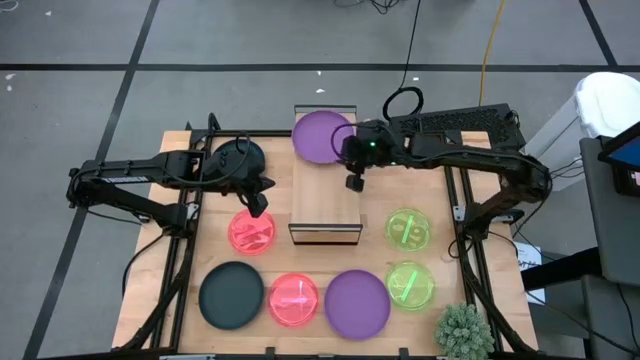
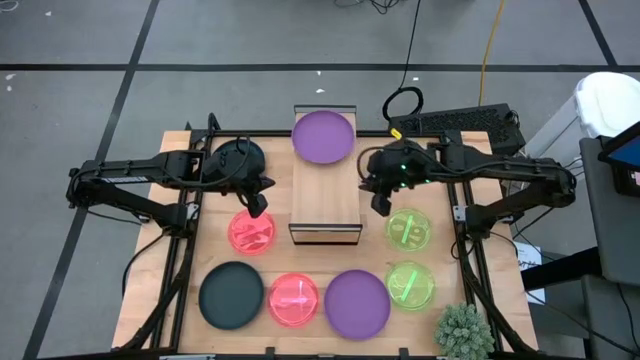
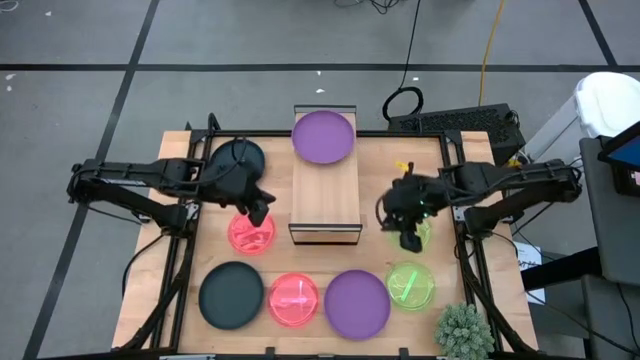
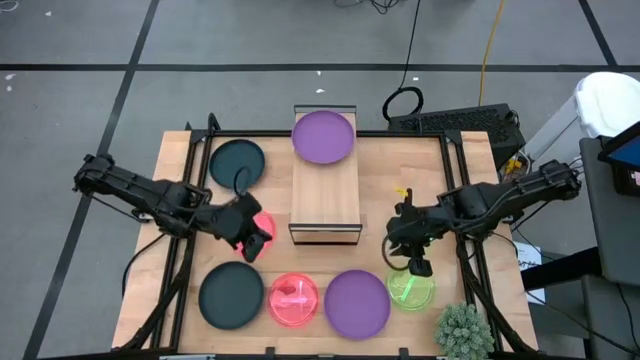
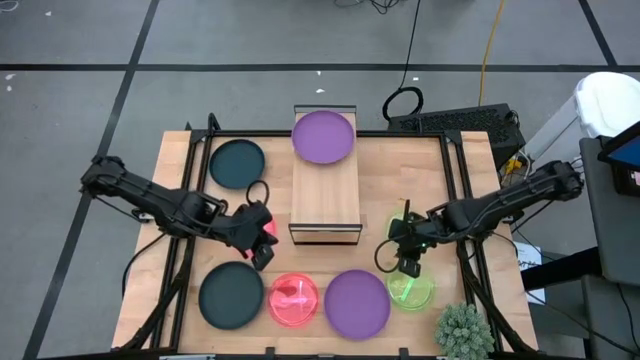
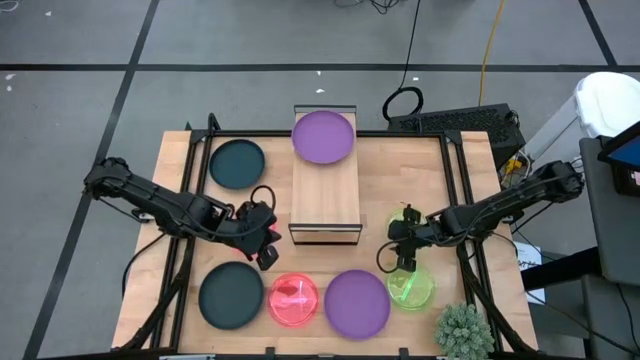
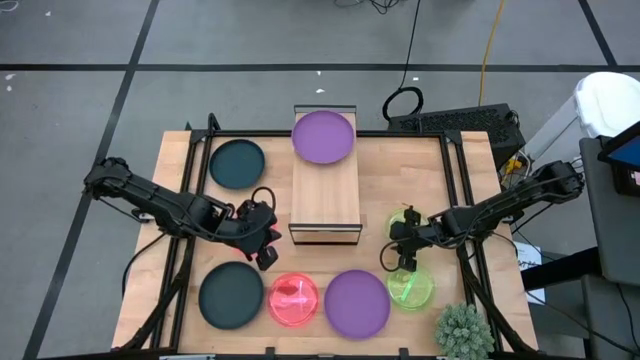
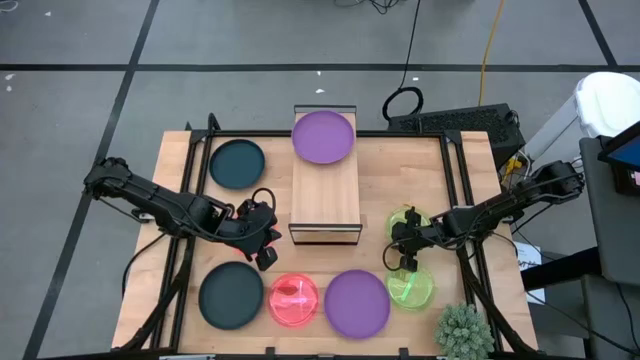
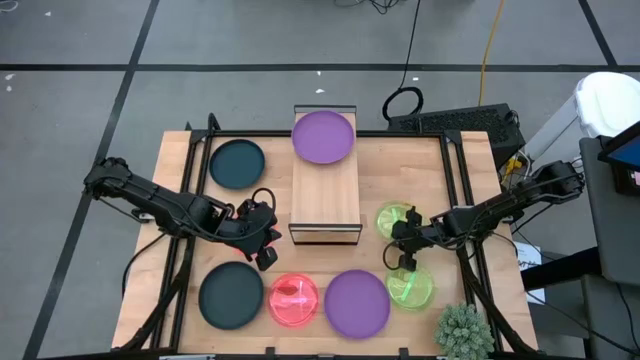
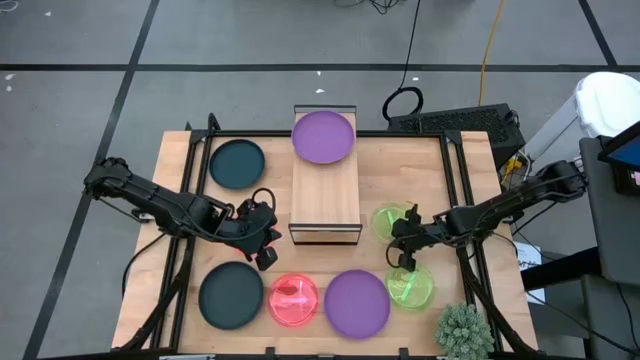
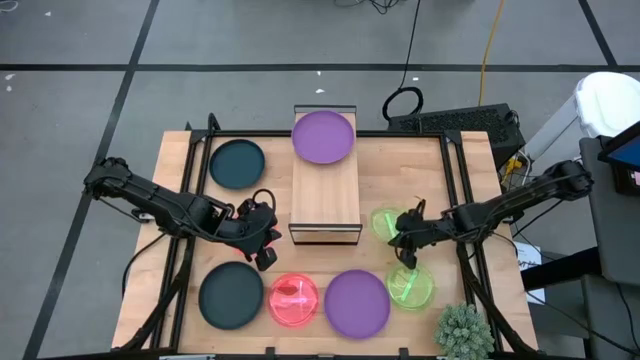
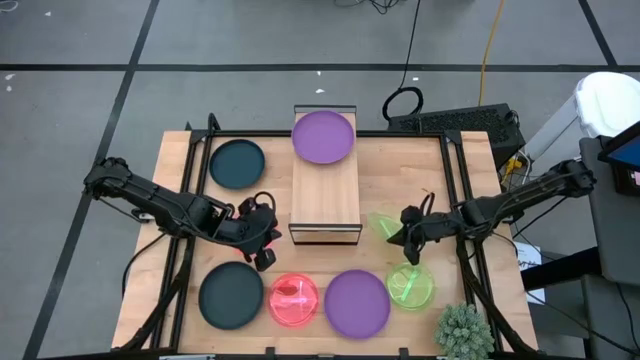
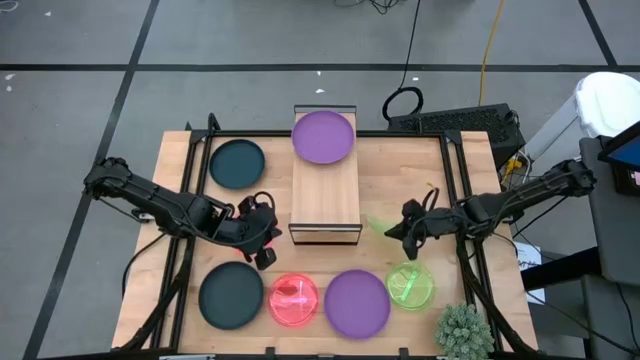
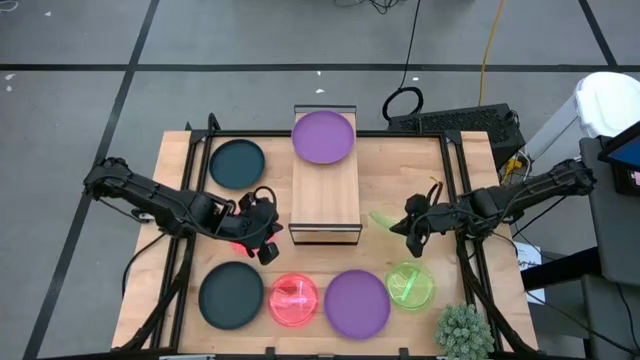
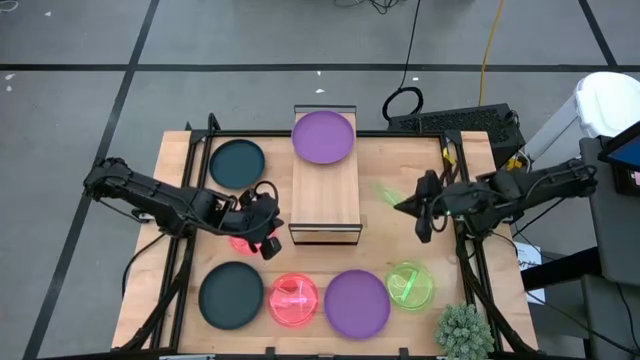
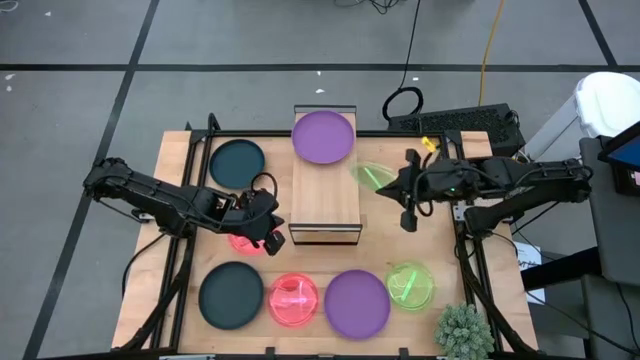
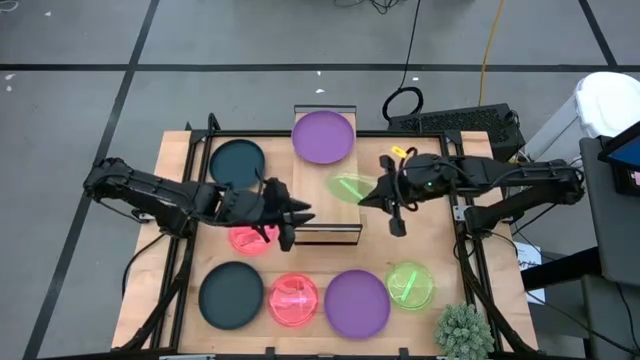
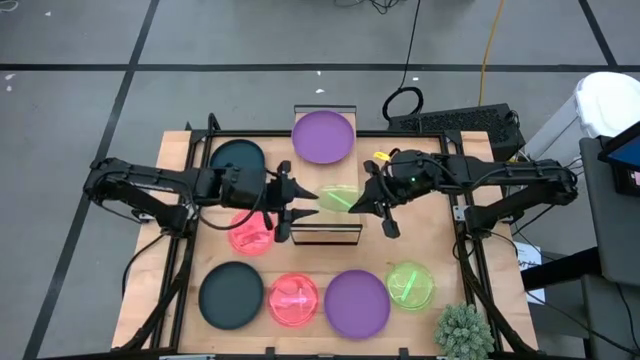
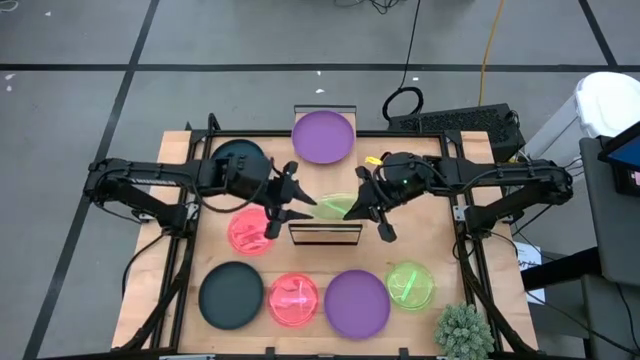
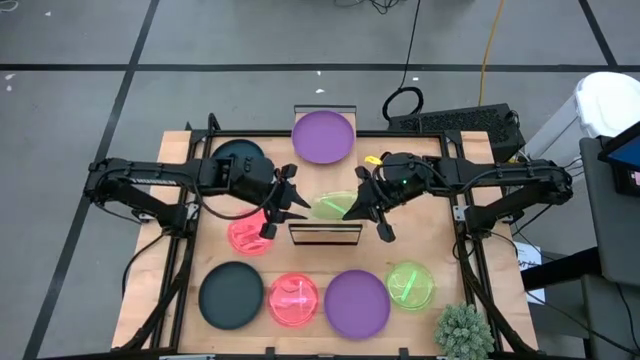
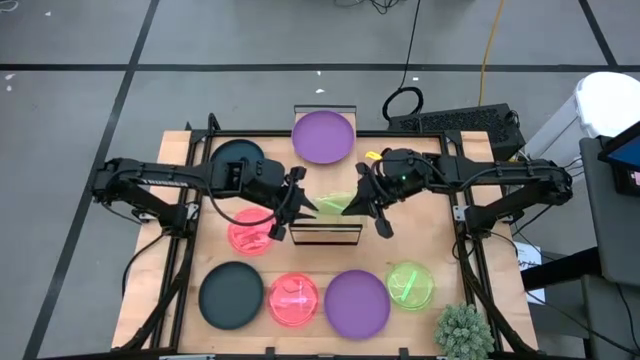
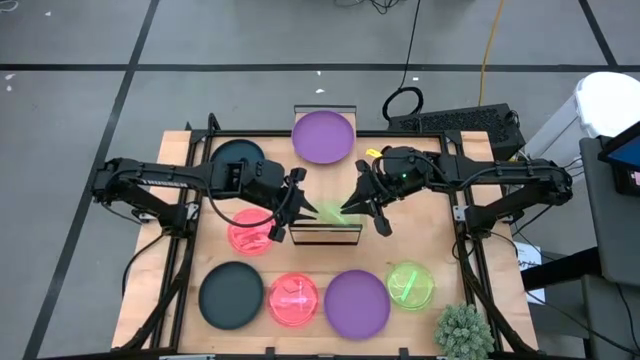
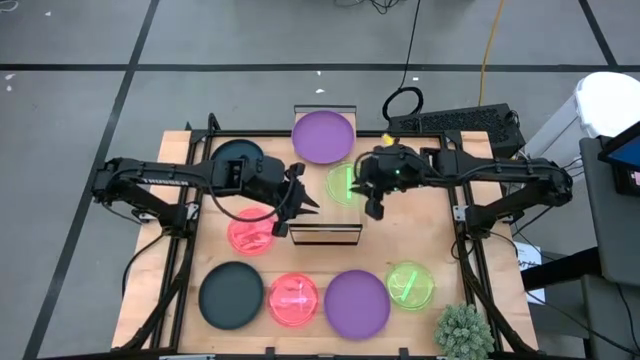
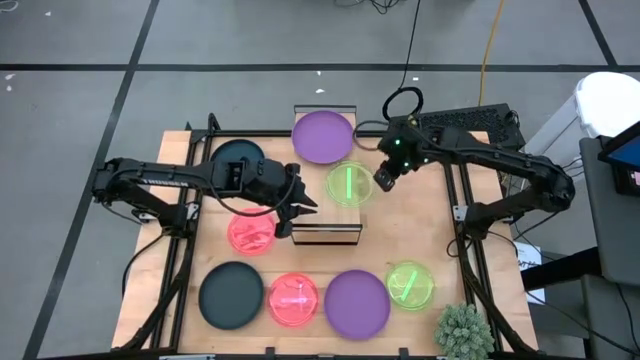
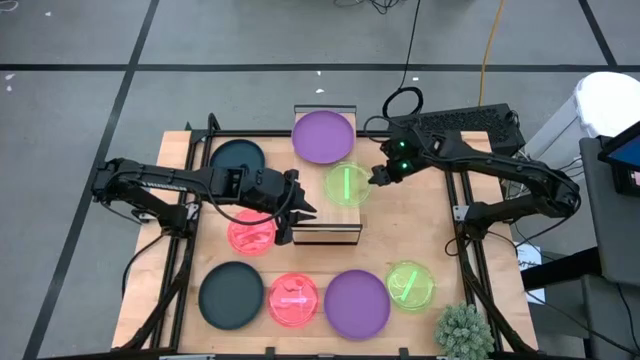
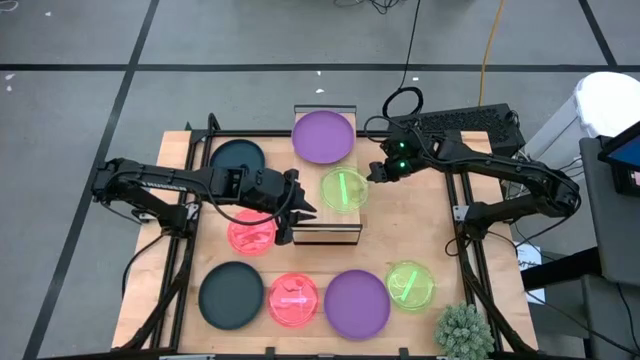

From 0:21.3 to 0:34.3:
Task: Place and stack plates onto a shelf
Put the top green plate on the shelf

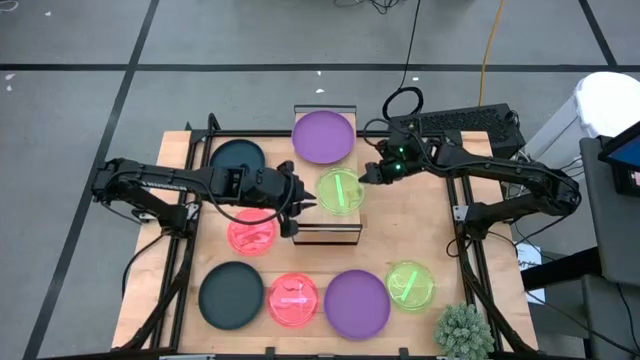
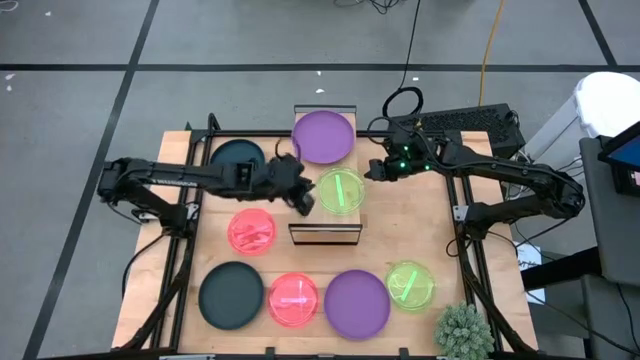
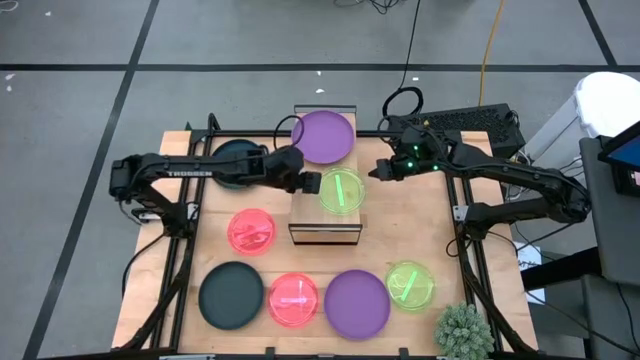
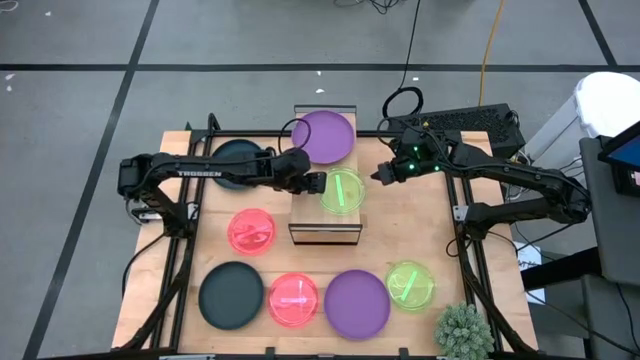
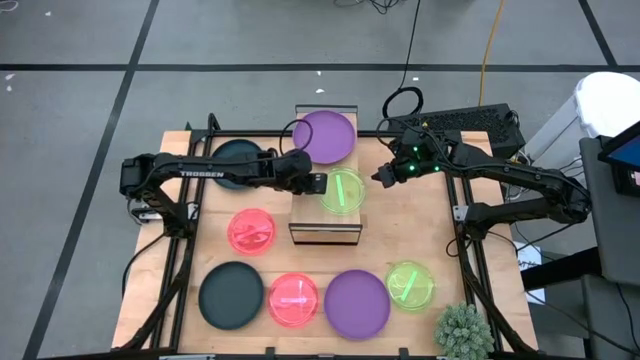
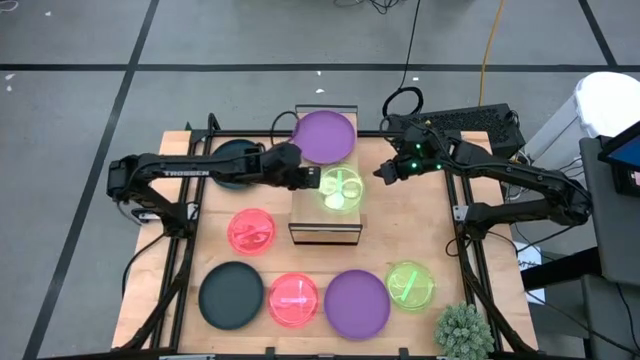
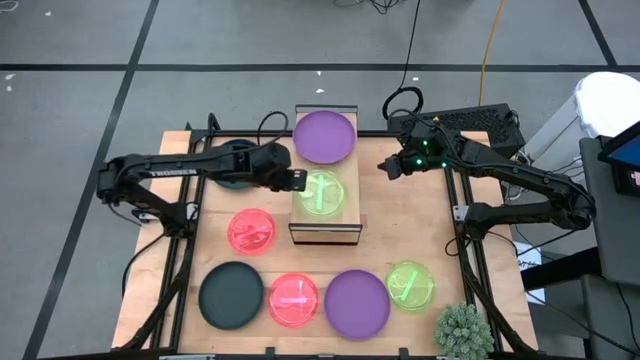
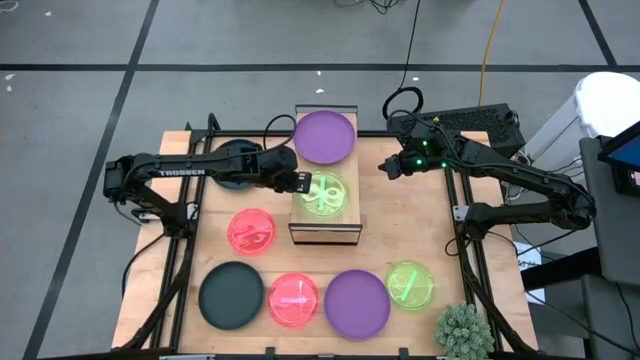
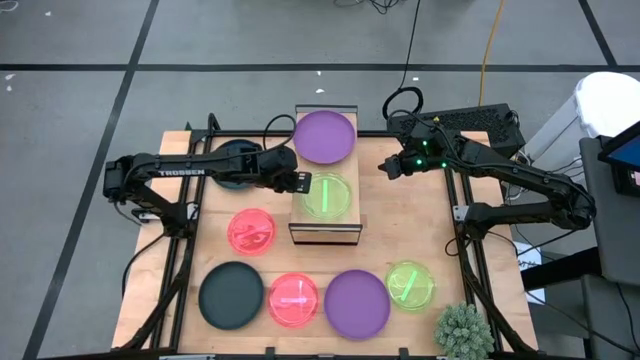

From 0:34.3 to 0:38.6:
Put the top green plate on the shelf

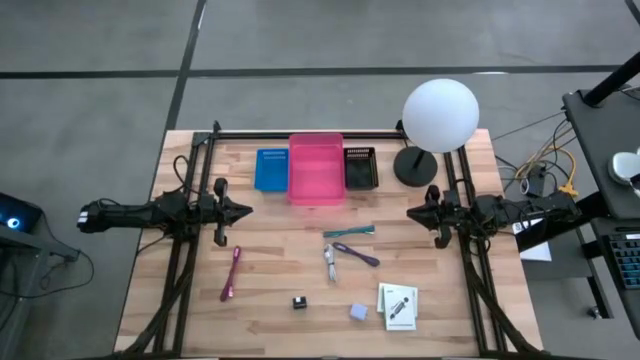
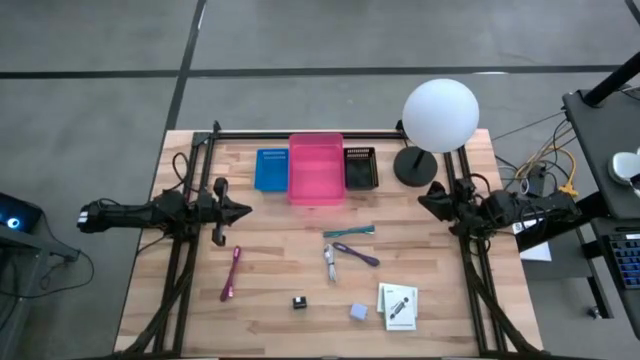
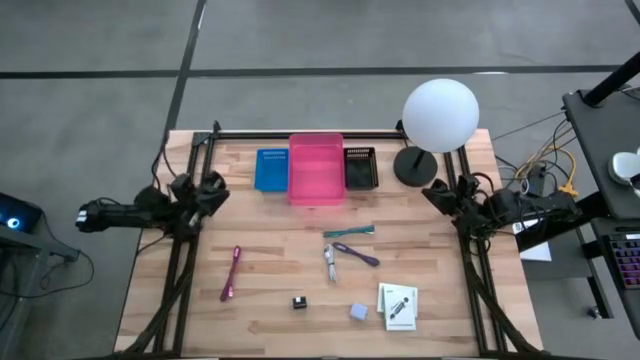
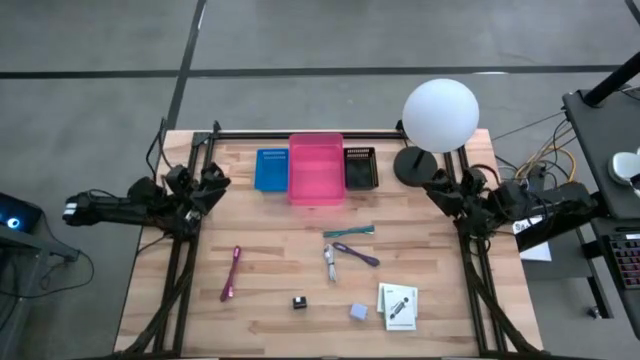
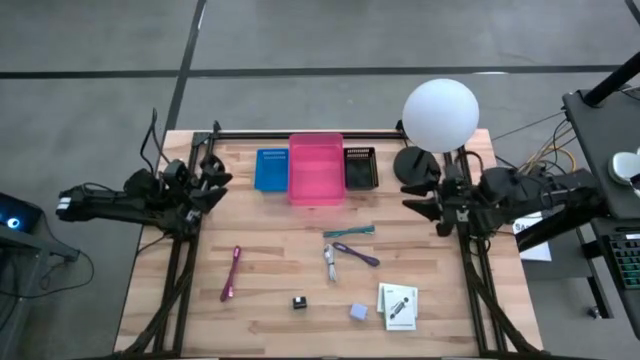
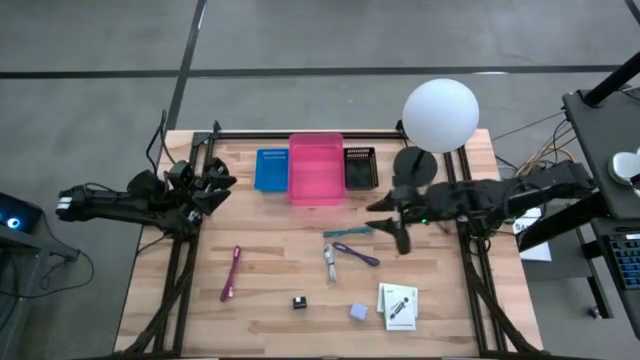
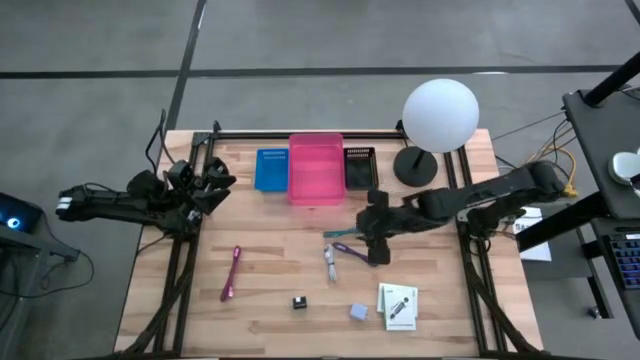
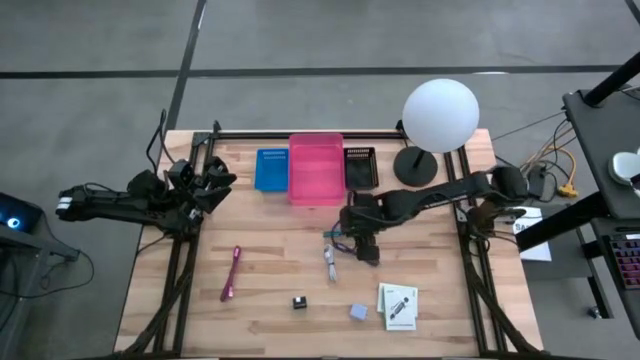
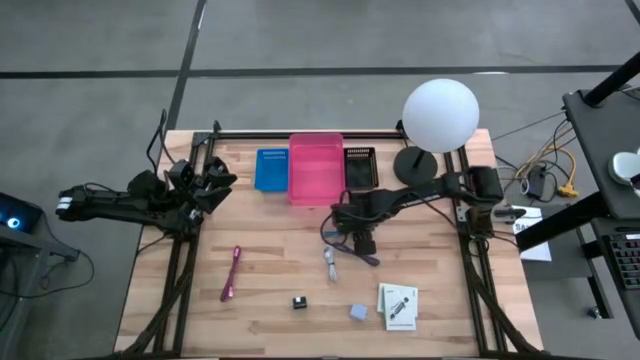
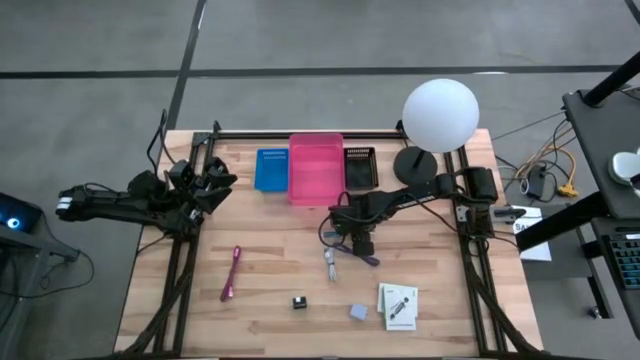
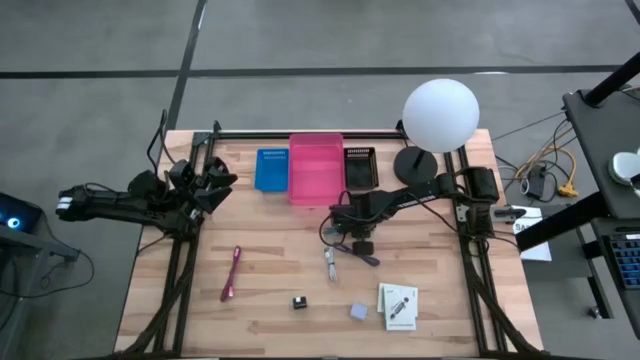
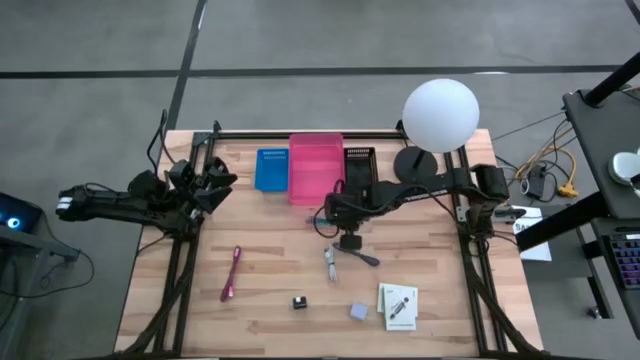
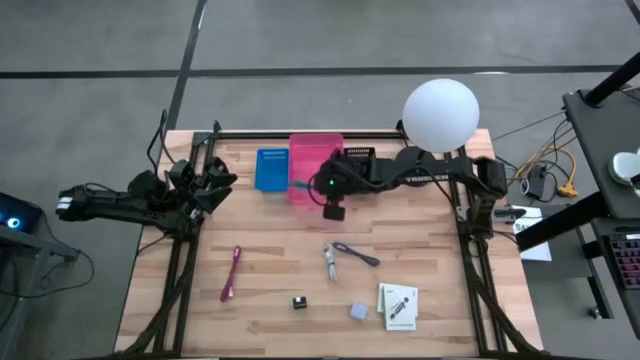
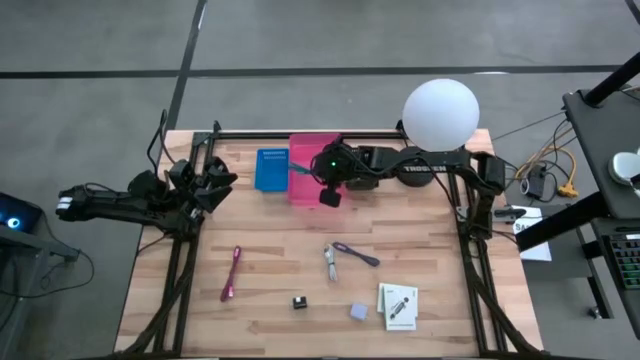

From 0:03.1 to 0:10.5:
Task: Pick and place items into bin
Put the light blue charger cable into the pink bin
